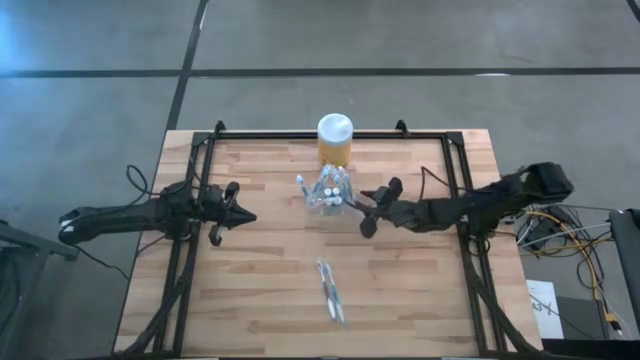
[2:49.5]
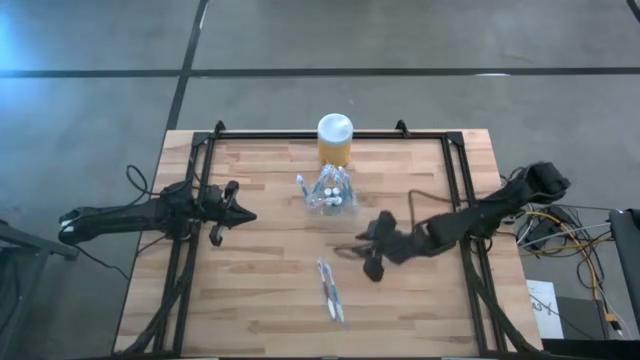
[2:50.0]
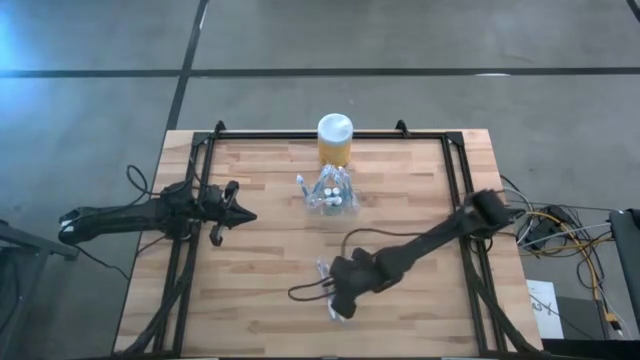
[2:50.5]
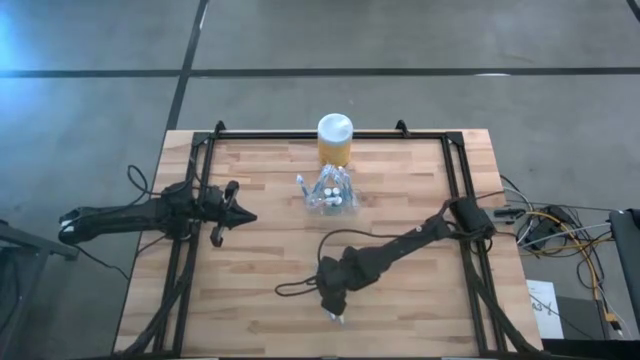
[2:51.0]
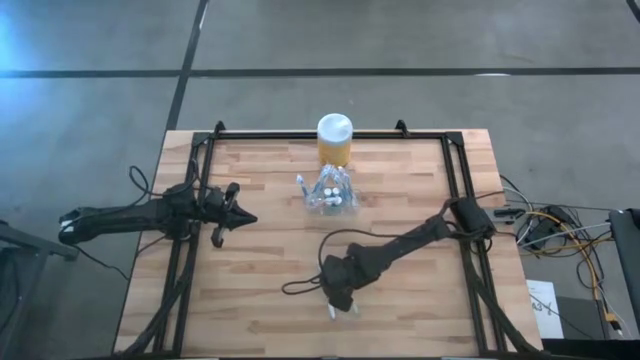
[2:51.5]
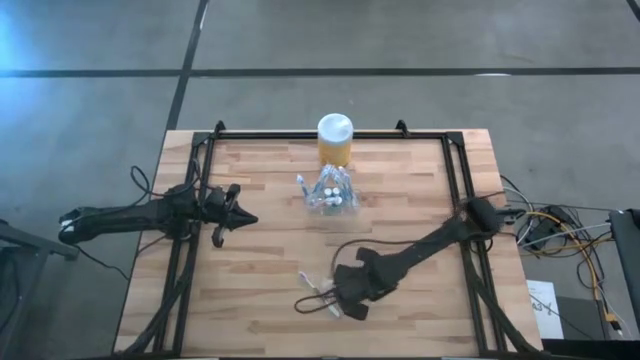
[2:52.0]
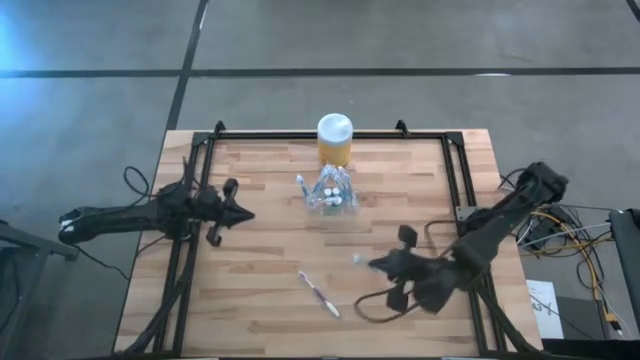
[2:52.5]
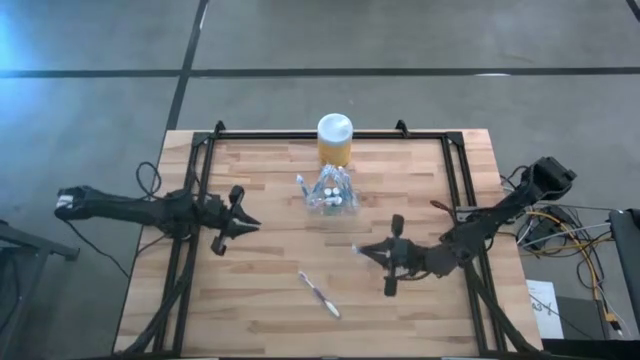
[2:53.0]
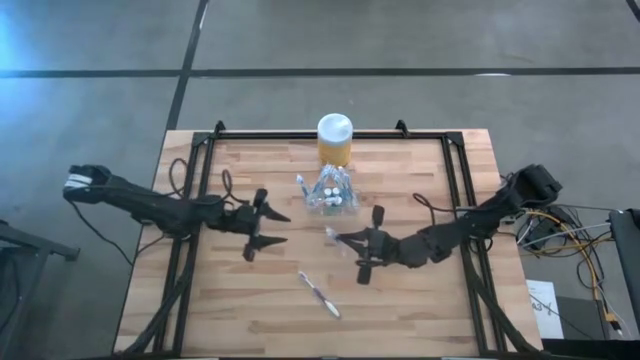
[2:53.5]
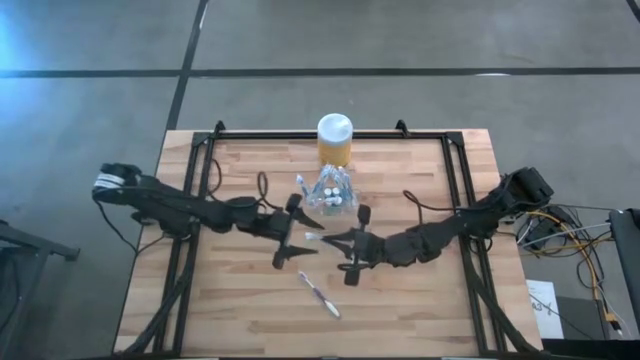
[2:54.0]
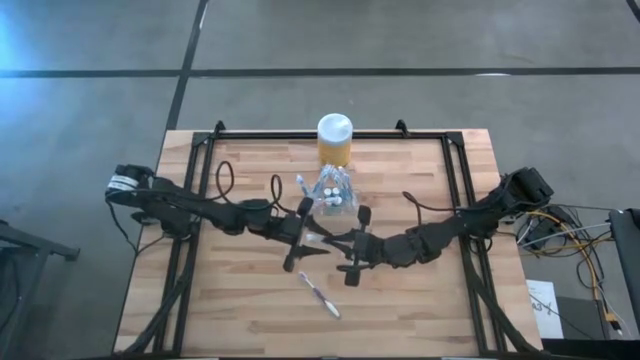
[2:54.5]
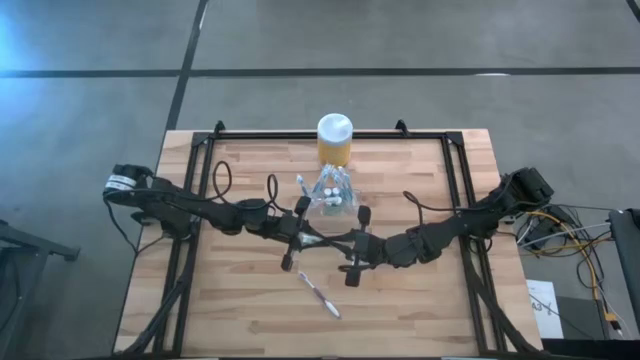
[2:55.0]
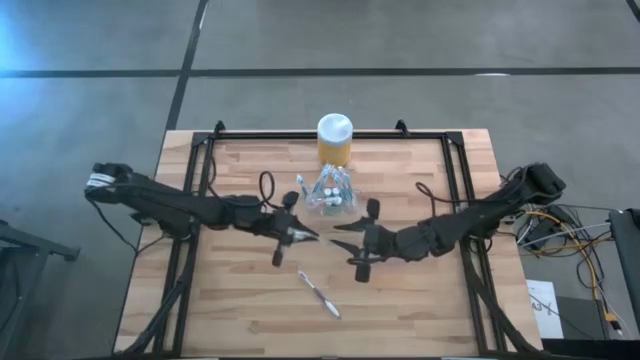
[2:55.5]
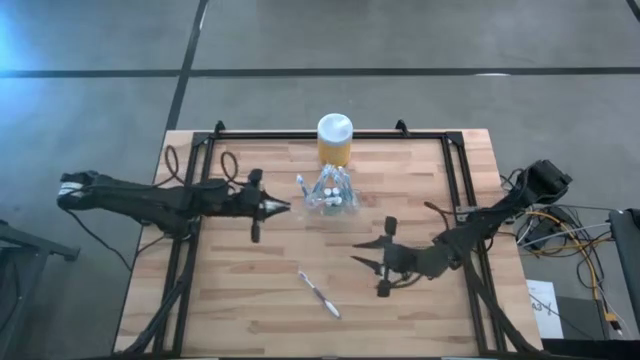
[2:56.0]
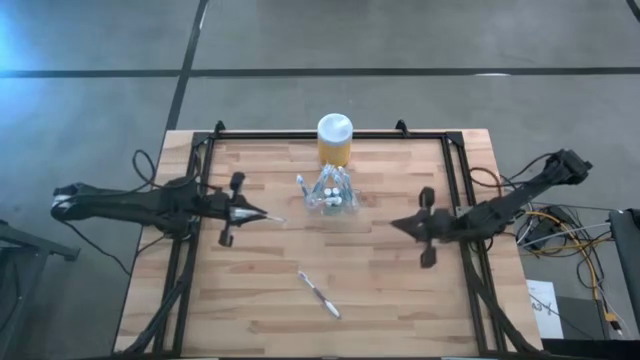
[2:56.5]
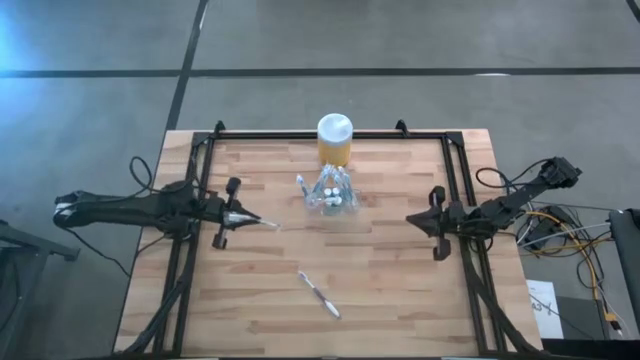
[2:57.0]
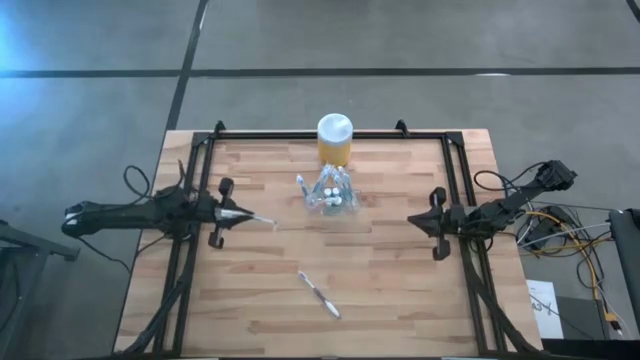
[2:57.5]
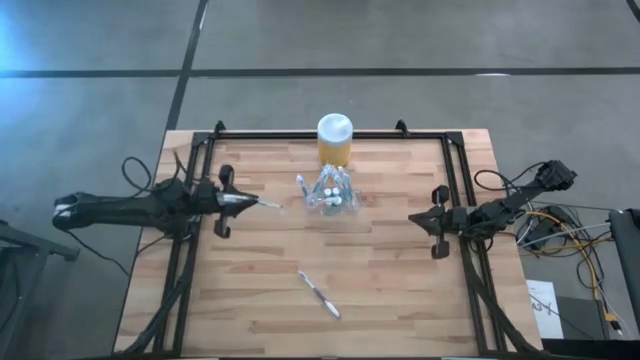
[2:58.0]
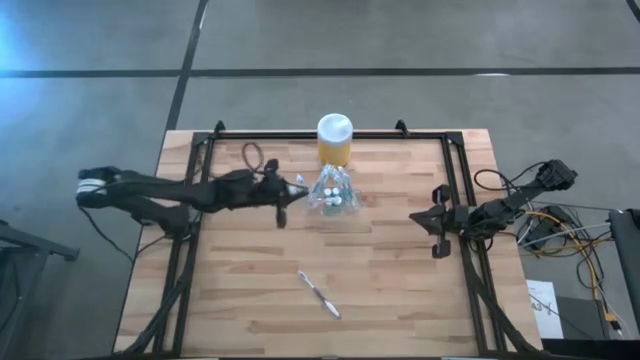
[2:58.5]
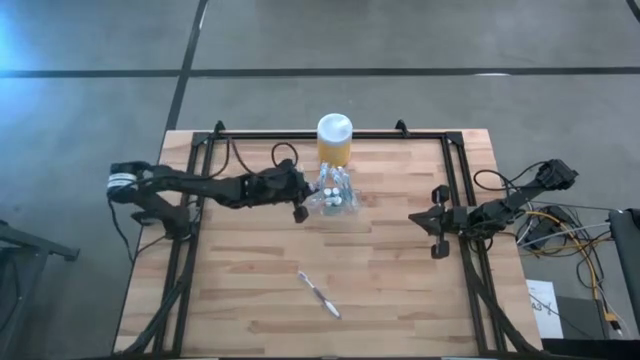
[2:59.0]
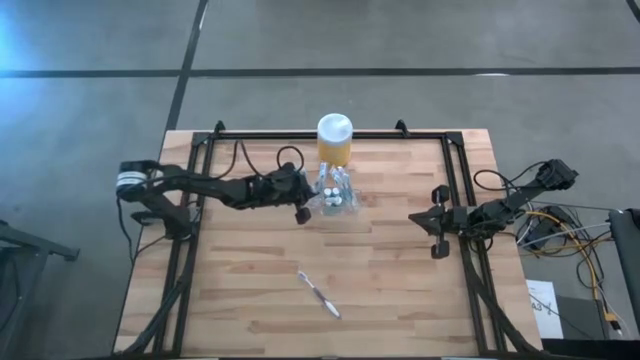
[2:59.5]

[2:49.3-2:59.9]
Task: Pick & Place toothbrushing station
Put the blue toothbrush into the left of the transparent organizer

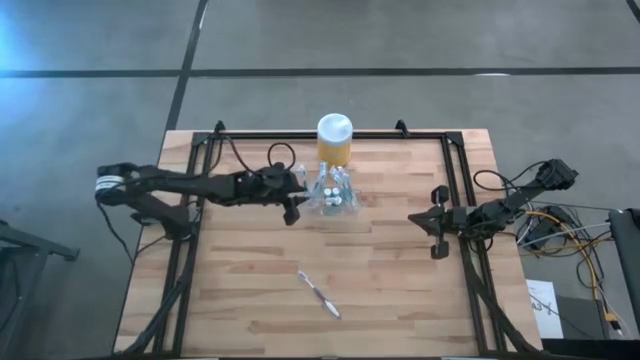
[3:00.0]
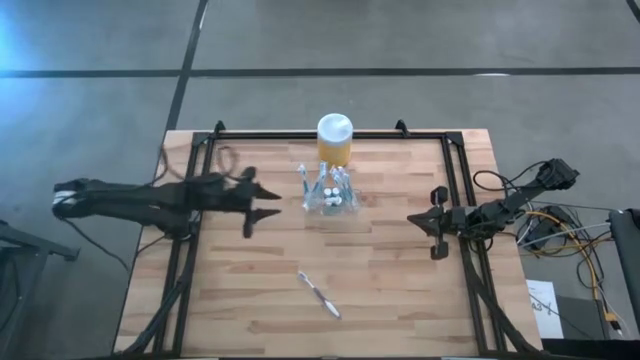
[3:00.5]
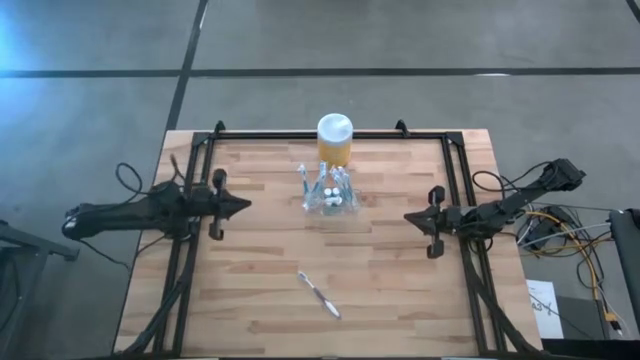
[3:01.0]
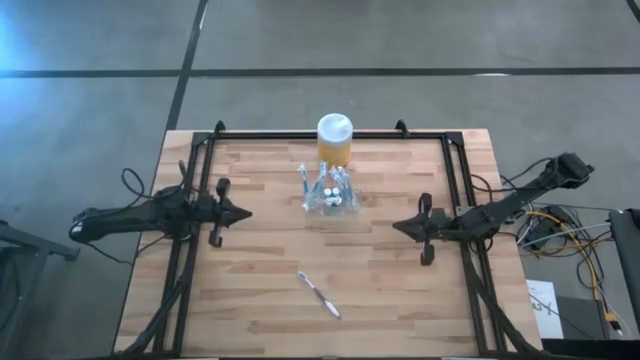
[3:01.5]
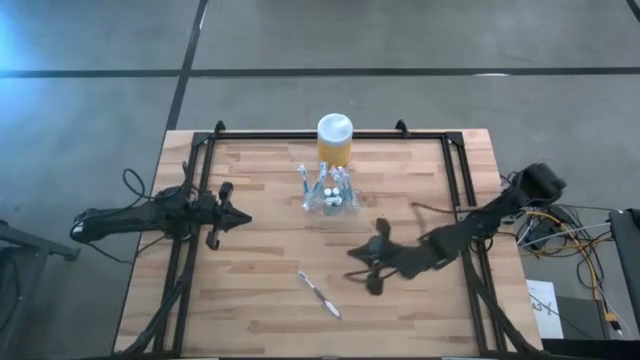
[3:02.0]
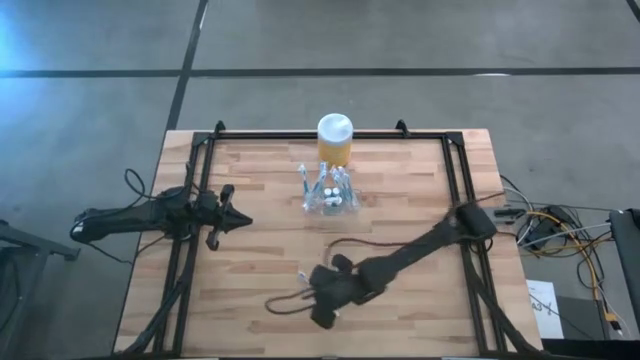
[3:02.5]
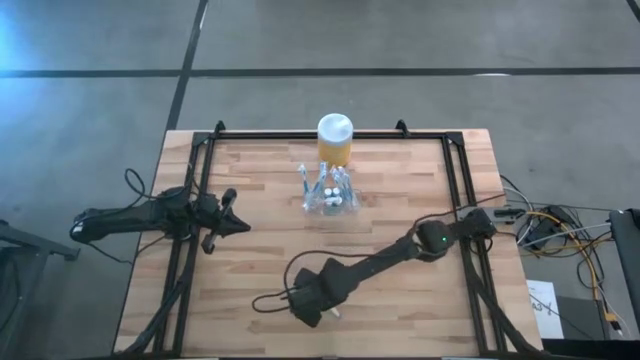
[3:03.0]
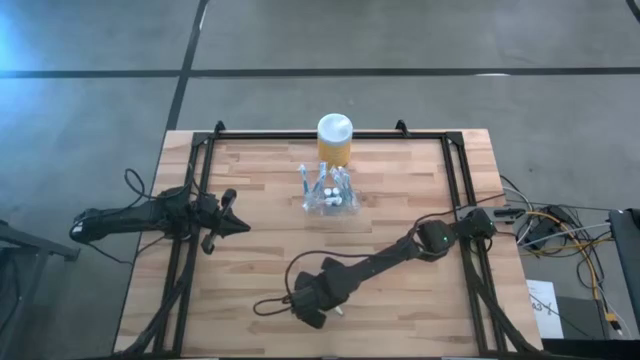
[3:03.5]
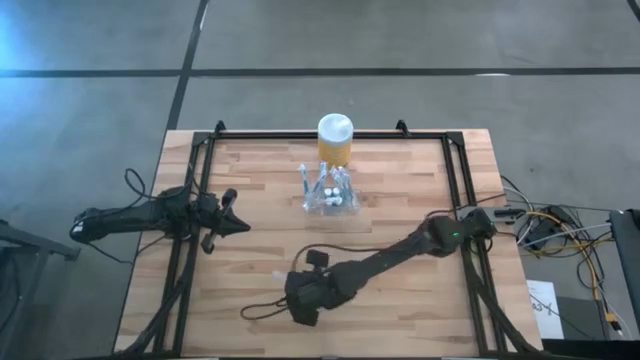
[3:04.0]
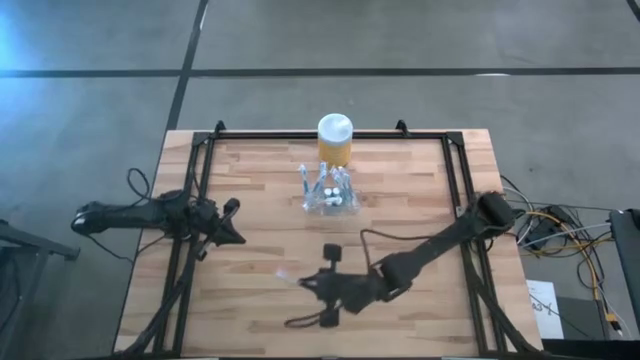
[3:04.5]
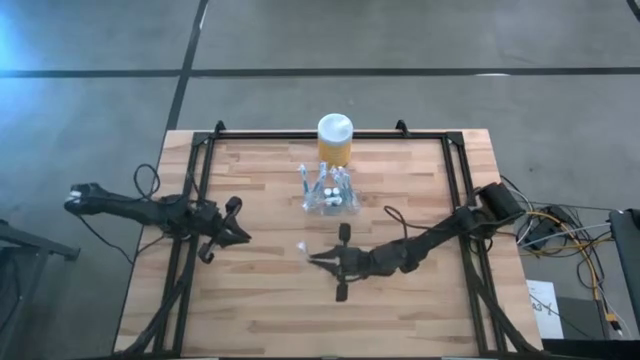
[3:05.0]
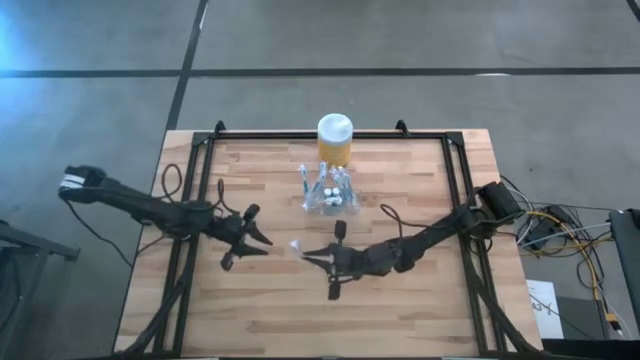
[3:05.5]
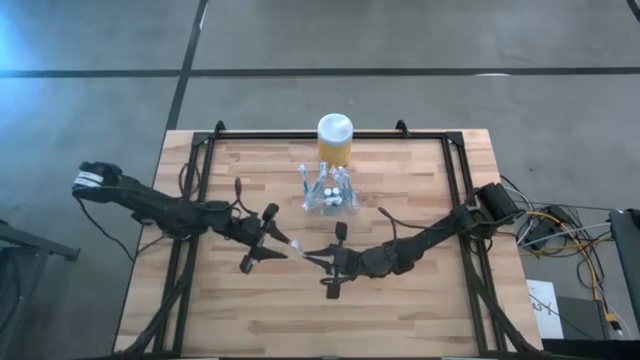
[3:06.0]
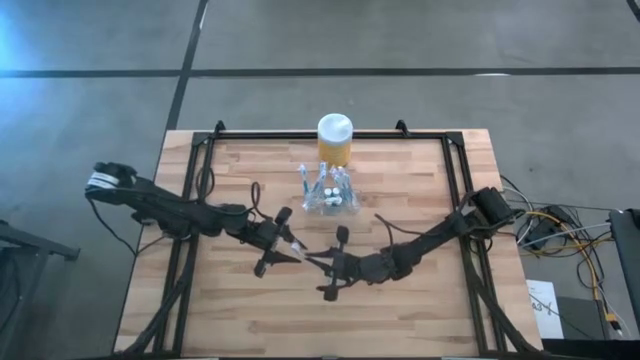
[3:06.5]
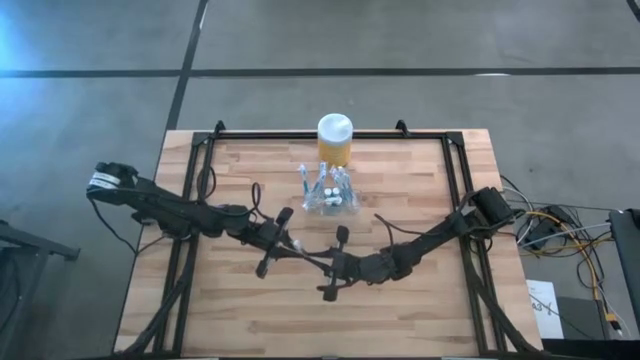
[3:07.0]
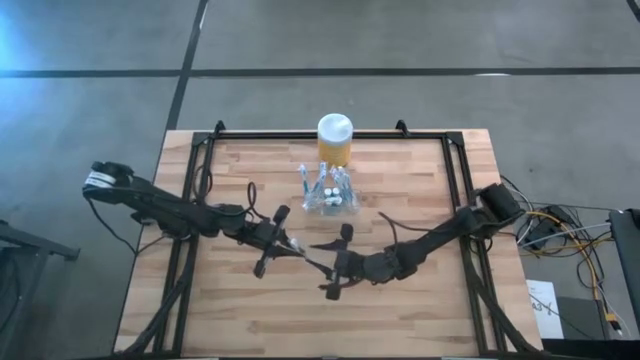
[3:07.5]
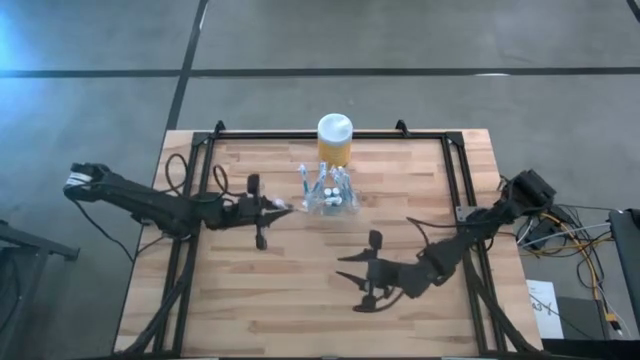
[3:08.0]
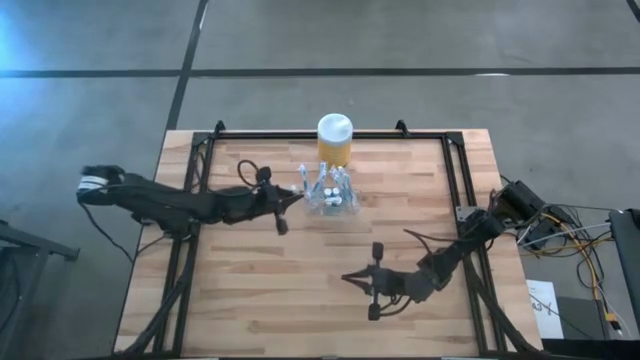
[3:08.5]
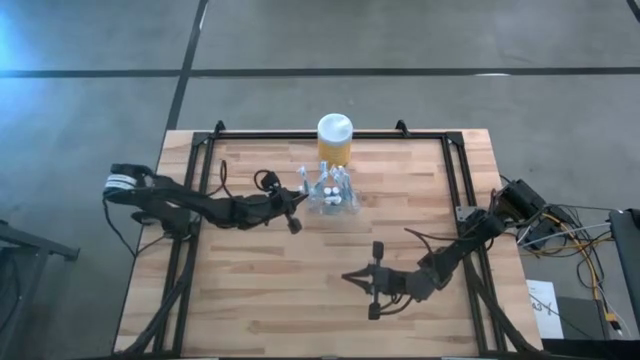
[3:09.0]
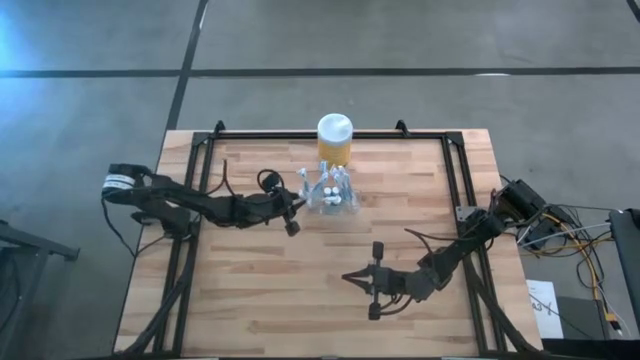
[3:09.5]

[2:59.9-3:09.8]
Put the purple toothbrush into the left of the transparent organizer

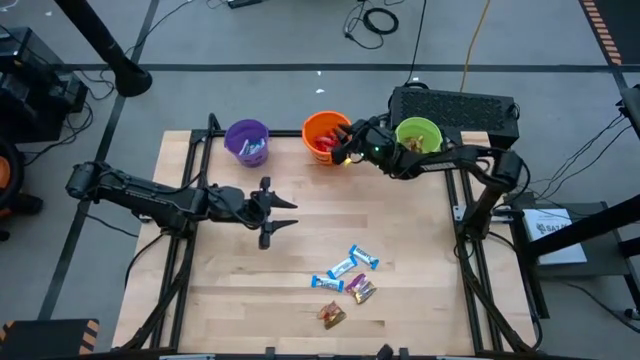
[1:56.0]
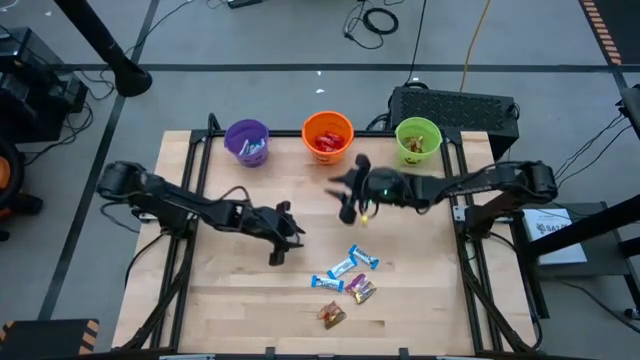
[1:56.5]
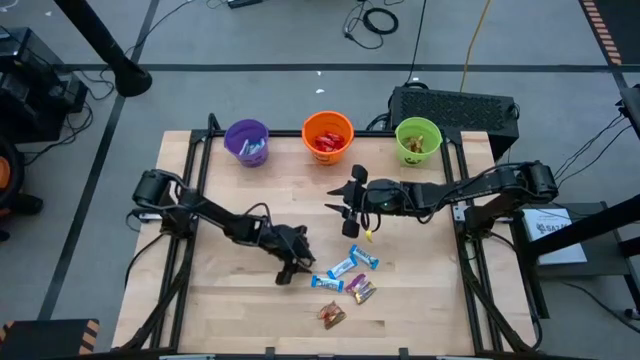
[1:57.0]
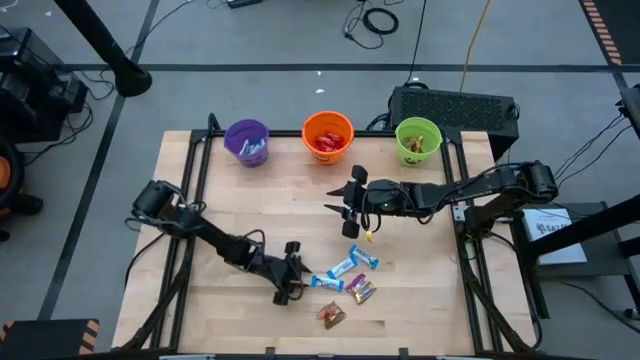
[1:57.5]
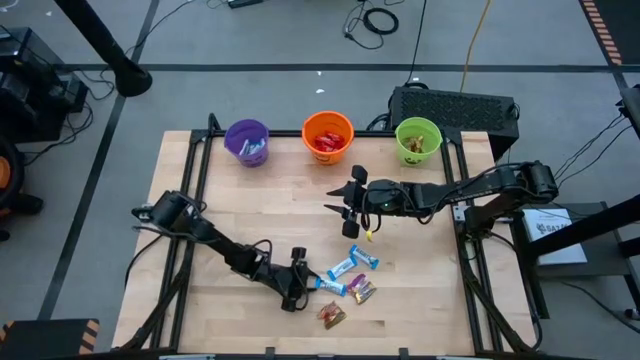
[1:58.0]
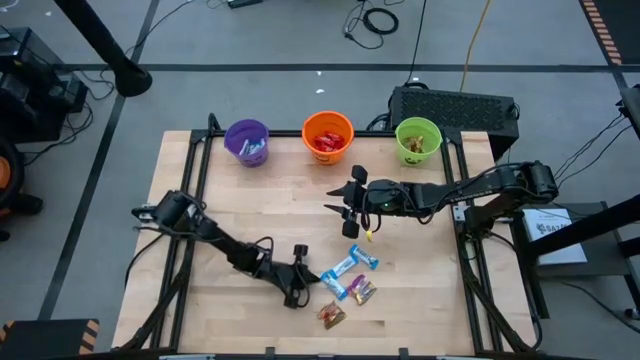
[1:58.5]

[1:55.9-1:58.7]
Task: Sort candy by brand, put in halloween buckets
Put the white chocolate into the purple bucket
